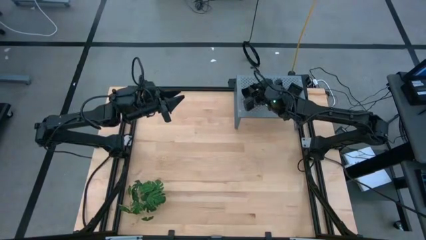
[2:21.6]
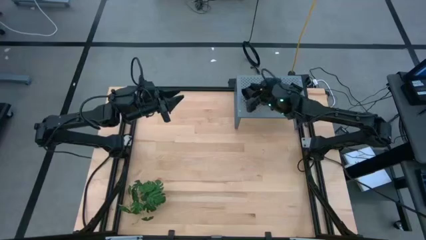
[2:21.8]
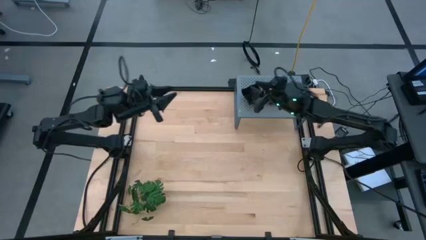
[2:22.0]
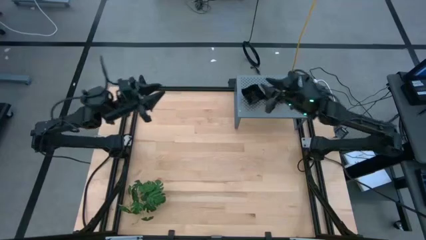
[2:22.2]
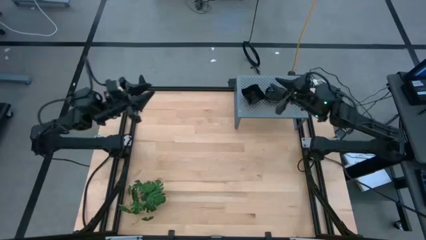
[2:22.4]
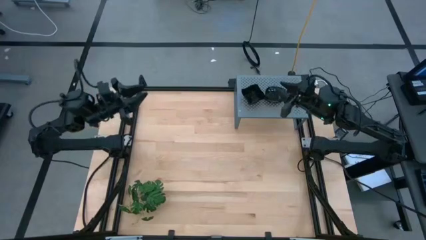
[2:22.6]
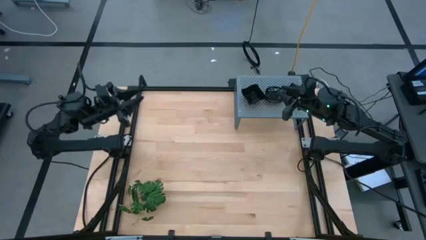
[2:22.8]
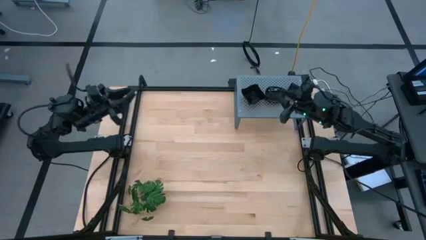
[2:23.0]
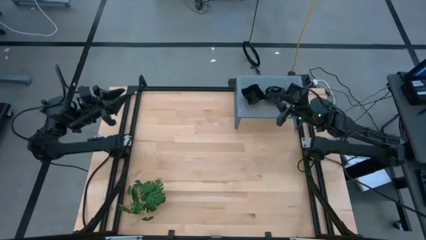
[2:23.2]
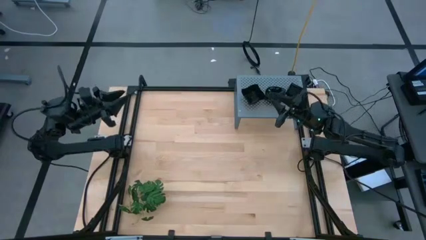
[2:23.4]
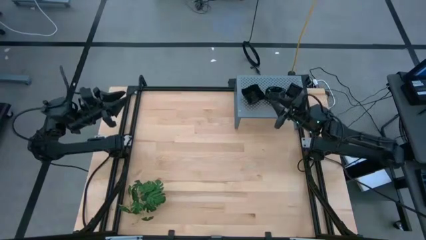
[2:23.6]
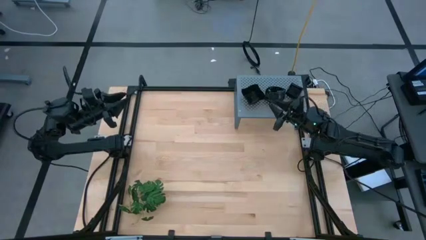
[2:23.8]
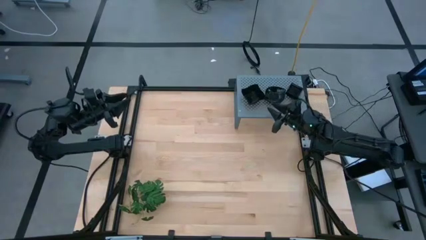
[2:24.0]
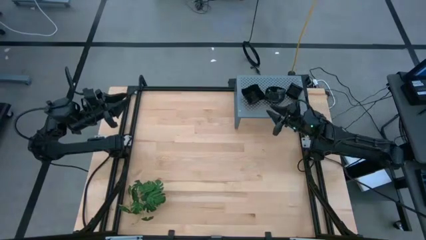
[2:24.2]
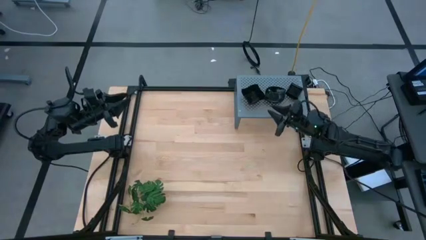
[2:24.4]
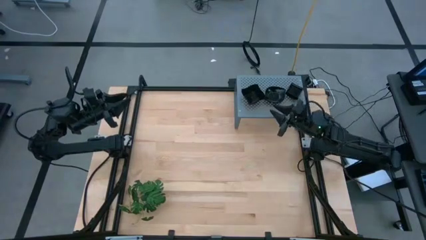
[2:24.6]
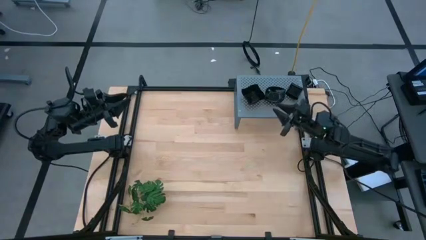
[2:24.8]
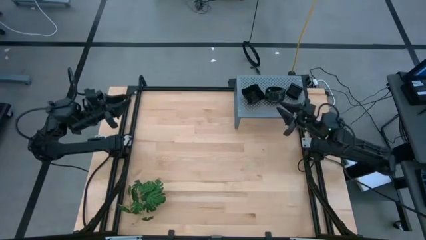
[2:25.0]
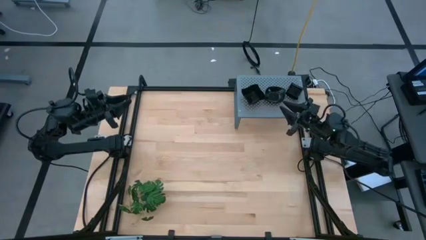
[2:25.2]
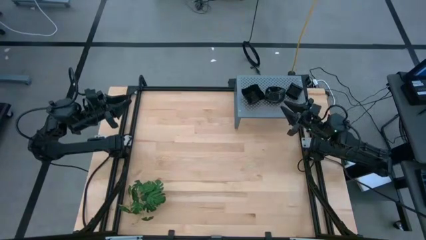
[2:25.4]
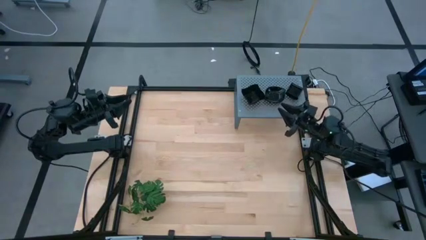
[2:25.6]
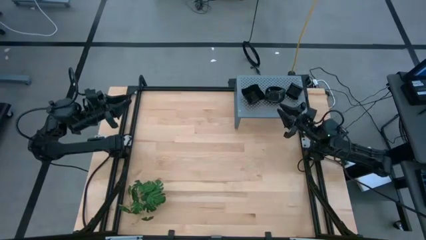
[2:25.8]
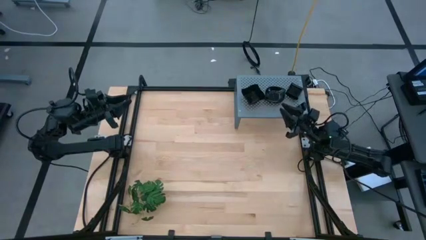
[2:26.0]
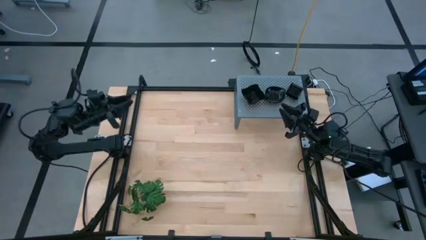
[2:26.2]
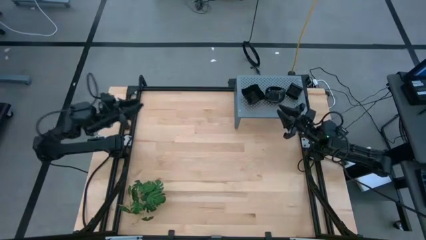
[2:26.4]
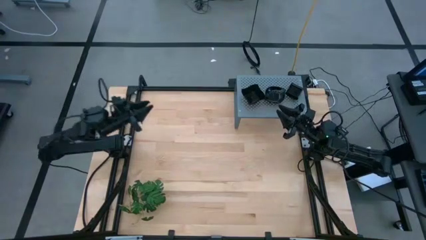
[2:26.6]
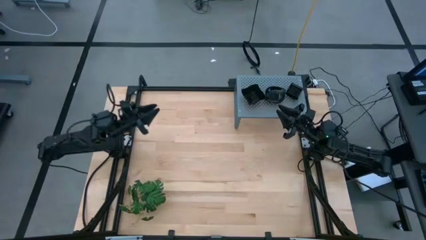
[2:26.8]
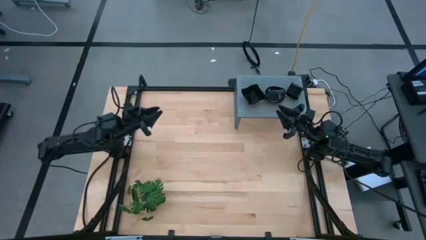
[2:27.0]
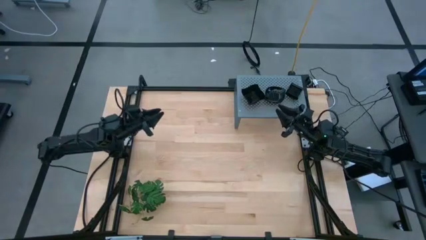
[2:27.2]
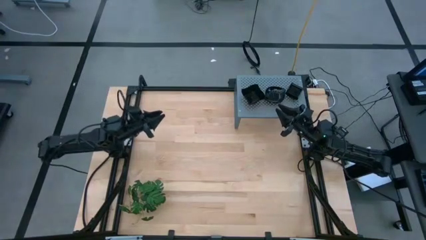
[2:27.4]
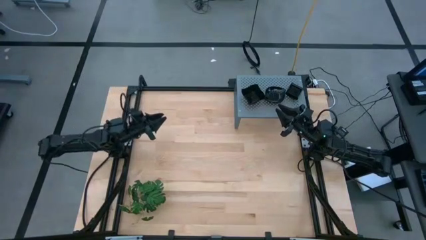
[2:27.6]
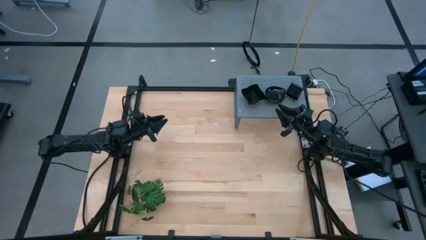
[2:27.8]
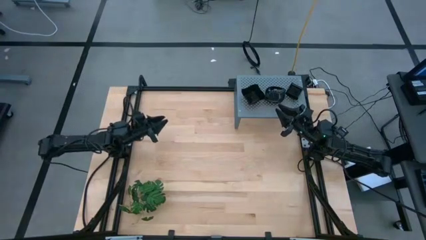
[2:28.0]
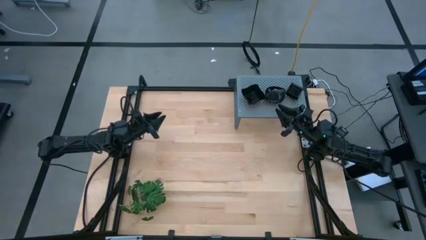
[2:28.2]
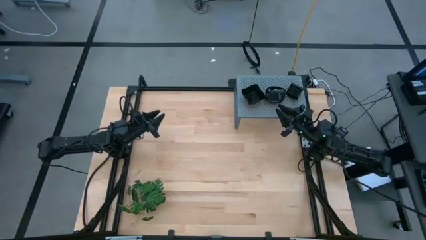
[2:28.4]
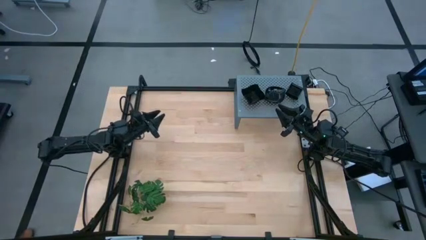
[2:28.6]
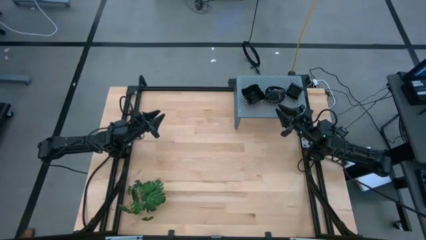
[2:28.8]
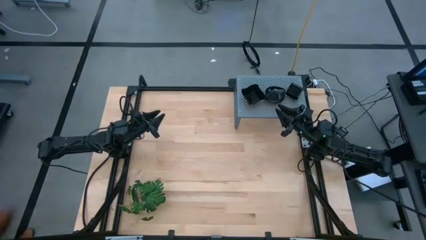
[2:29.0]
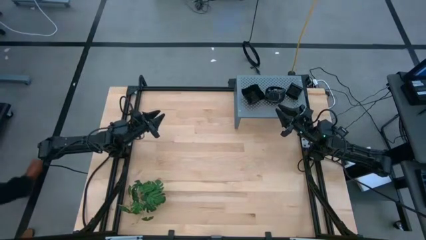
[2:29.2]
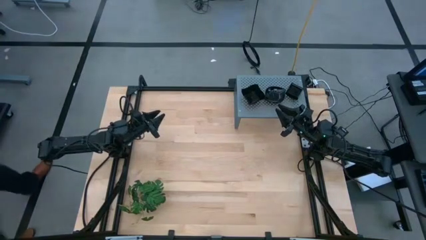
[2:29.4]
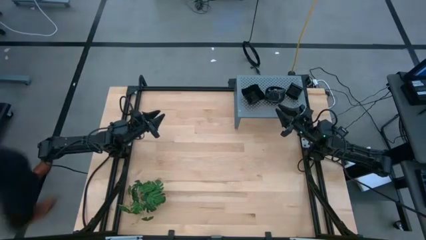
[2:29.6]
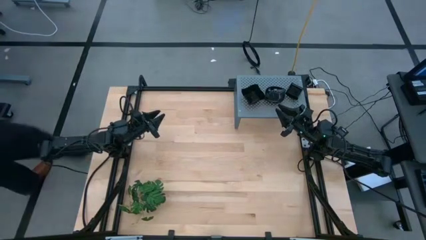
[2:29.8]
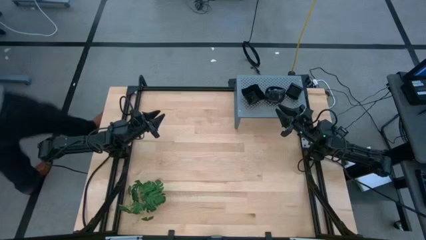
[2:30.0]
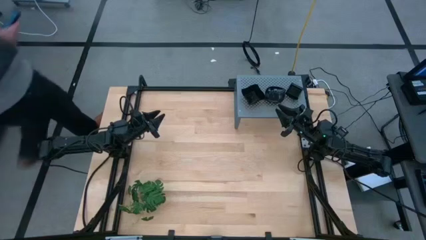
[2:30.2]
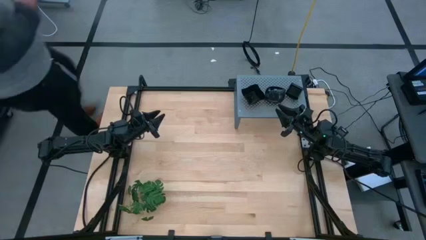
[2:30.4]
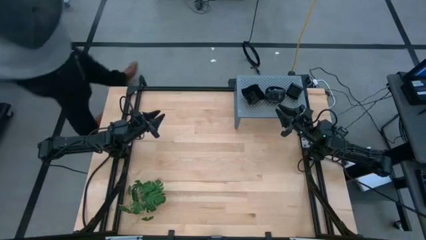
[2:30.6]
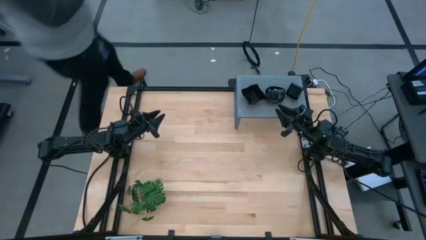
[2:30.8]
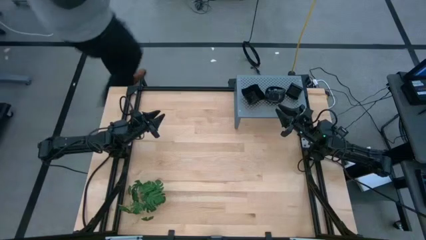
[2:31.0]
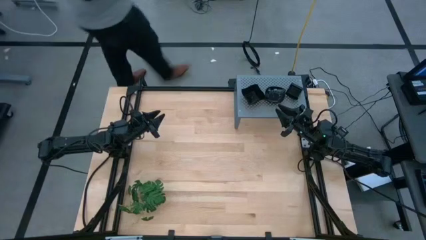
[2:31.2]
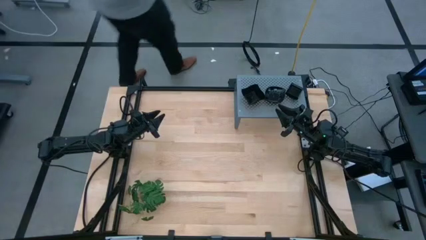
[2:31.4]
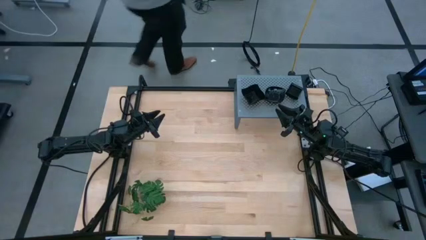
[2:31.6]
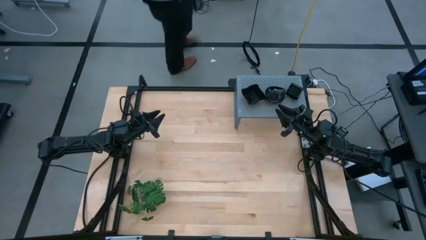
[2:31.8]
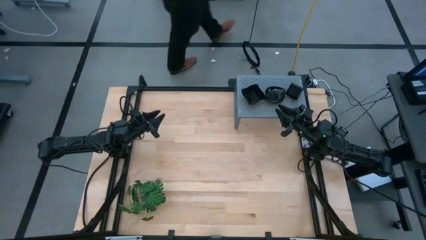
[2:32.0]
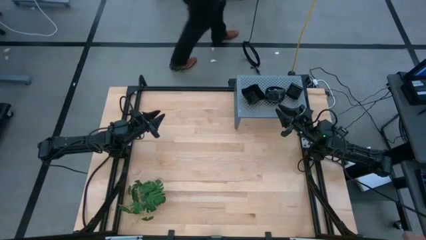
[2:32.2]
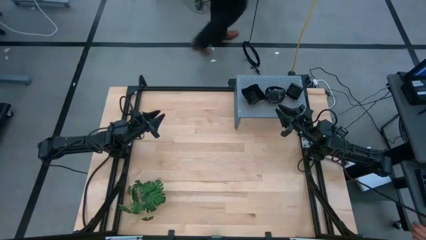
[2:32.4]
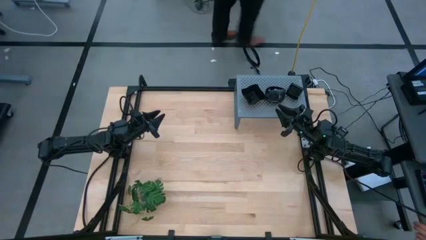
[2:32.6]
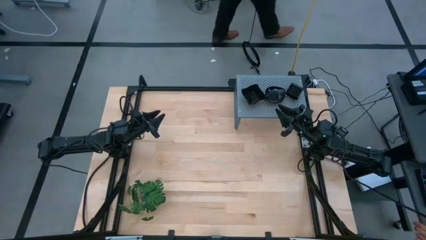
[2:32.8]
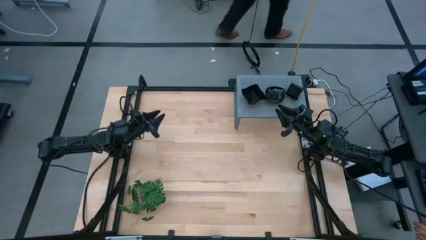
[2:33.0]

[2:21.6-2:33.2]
Task: Pick & Place Mini shaped plates
Return to Home Position

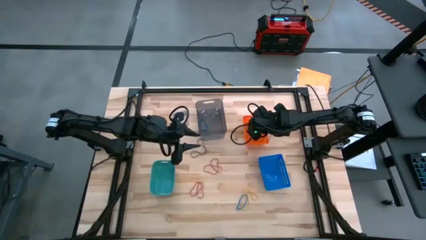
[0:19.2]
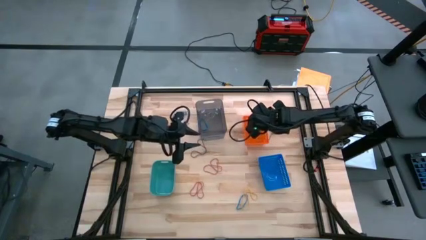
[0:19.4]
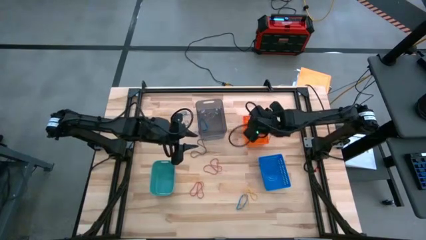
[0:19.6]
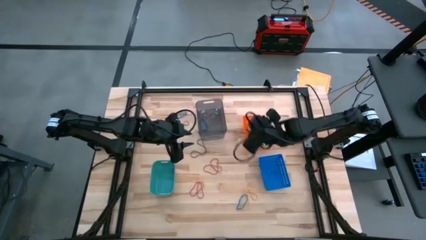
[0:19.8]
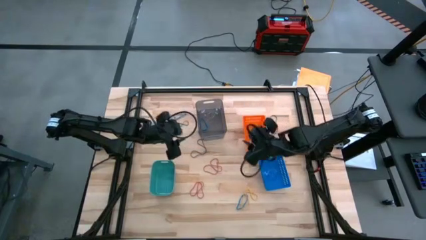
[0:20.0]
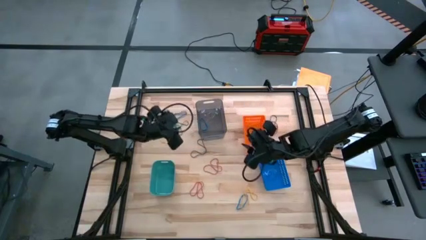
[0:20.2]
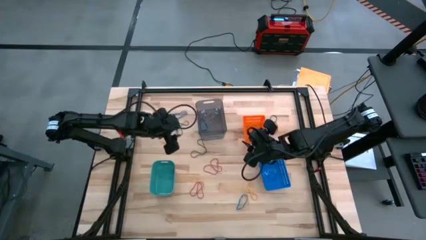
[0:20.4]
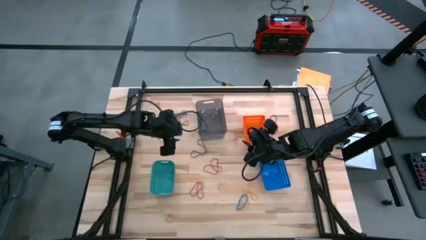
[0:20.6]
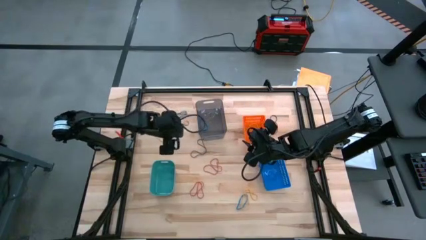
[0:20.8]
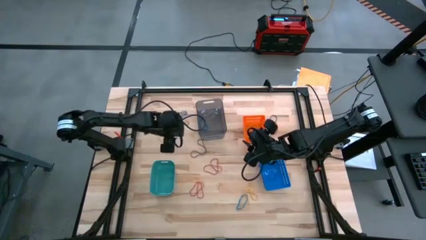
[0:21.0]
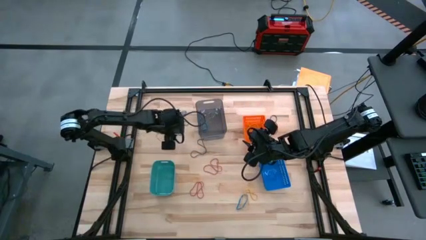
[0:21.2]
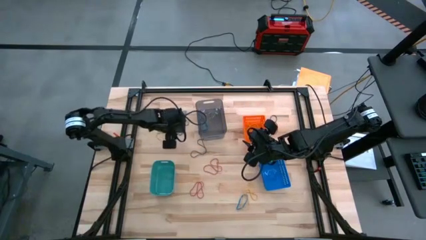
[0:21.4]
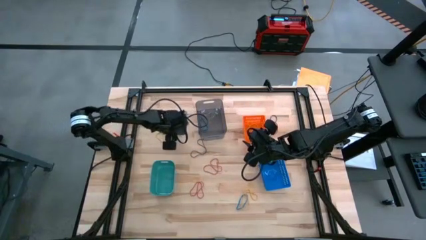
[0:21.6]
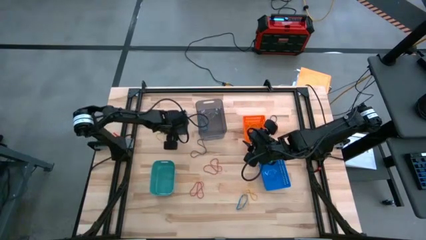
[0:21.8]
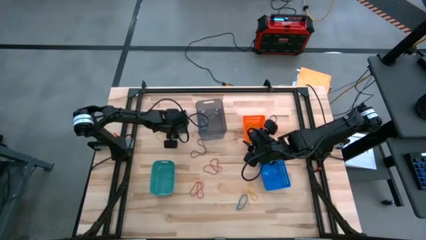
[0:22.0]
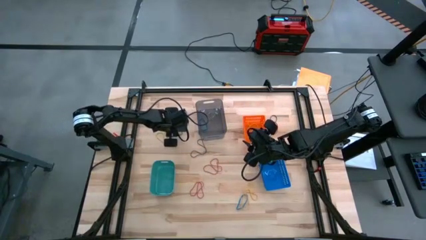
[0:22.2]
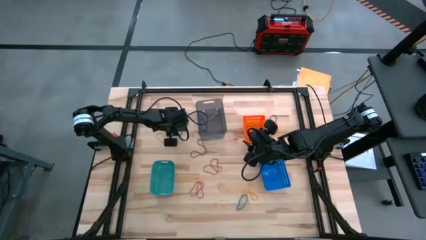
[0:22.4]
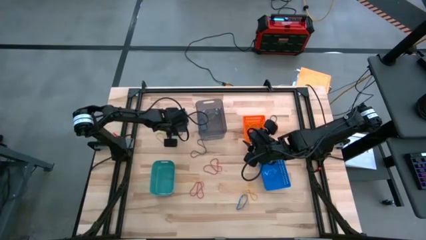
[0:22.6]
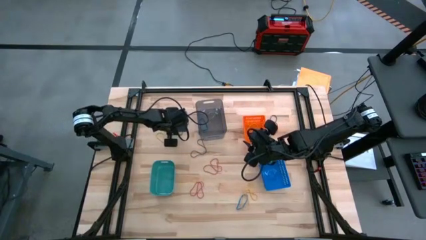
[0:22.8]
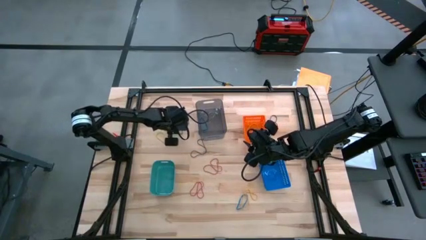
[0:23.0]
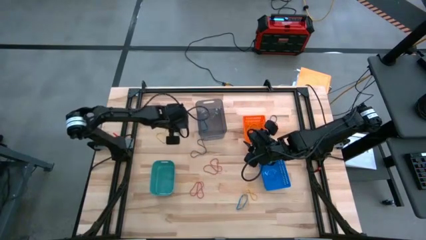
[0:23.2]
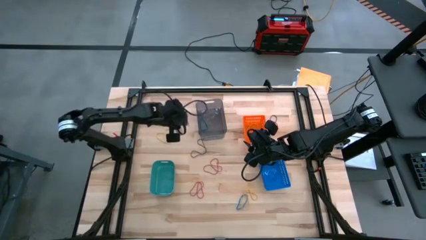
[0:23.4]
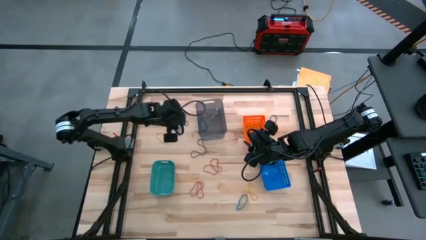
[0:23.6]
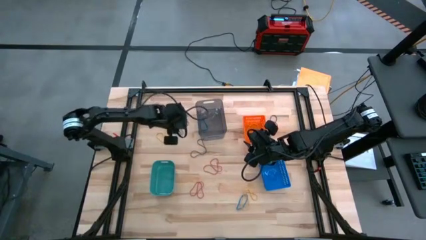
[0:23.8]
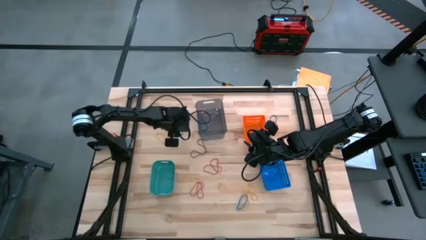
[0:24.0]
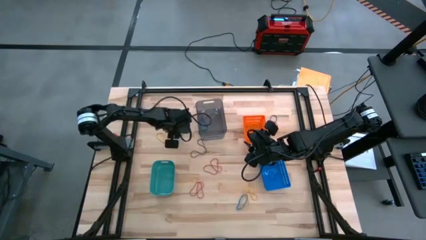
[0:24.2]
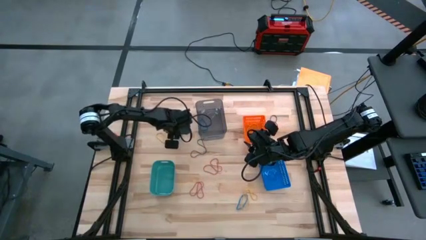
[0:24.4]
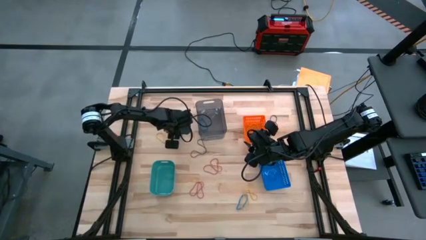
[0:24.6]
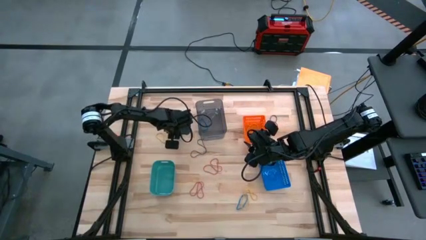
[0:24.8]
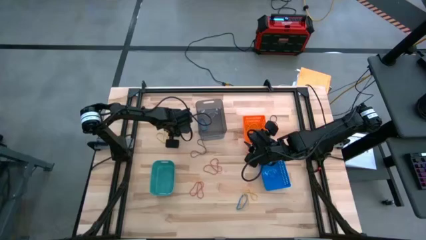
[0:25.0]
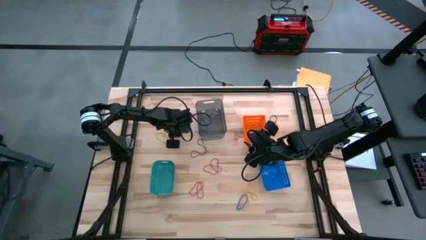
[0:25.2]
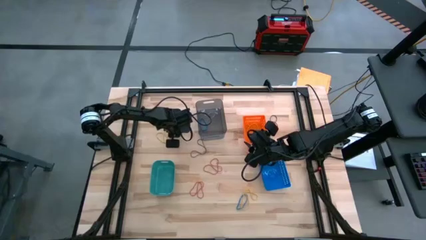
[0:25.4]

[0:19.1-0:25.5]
Task: Sort rubber bands into baskets
Put the blue rubber band into the black bin
